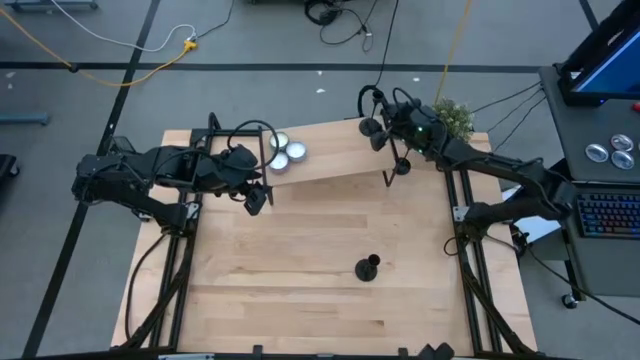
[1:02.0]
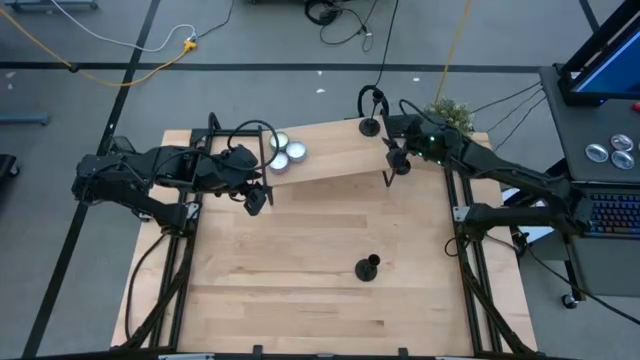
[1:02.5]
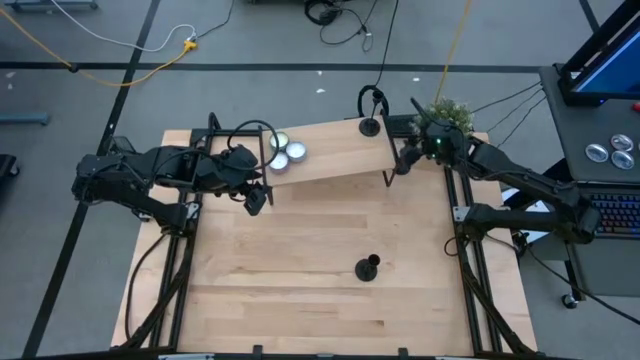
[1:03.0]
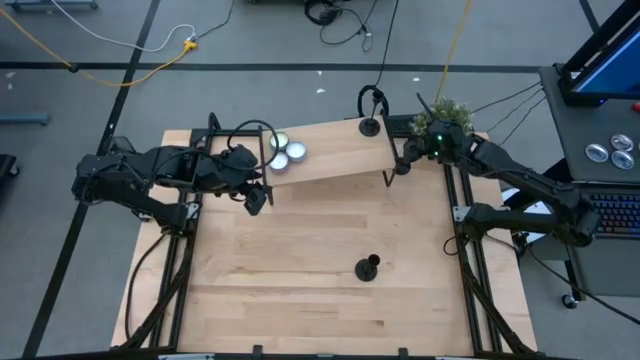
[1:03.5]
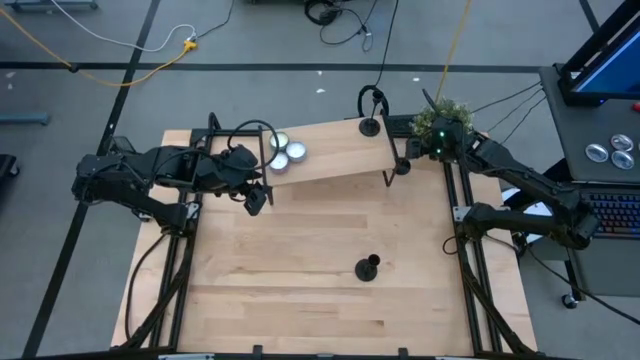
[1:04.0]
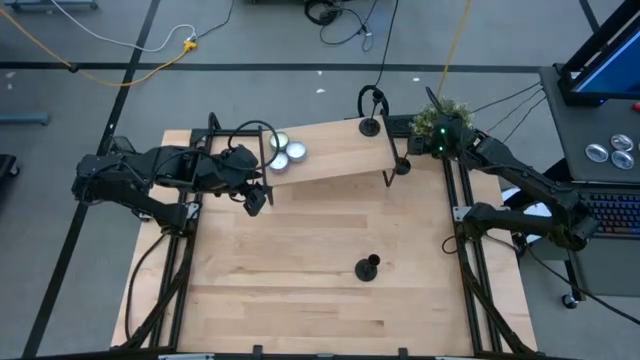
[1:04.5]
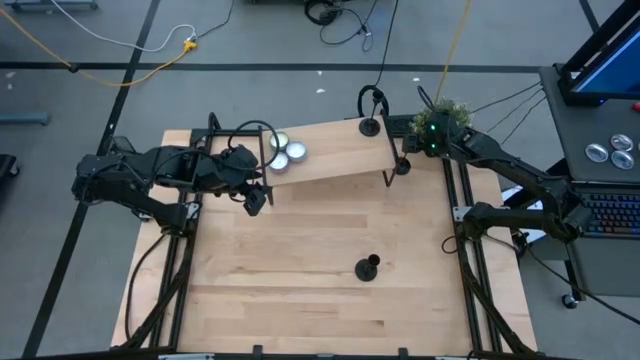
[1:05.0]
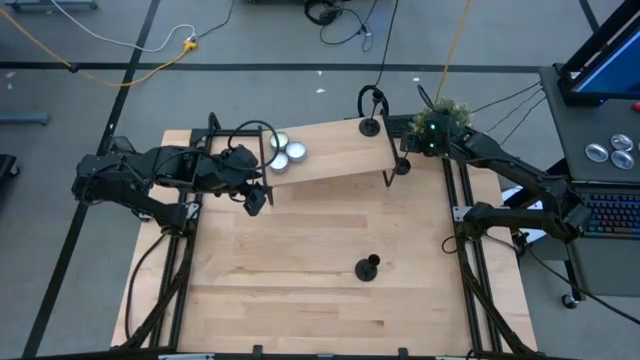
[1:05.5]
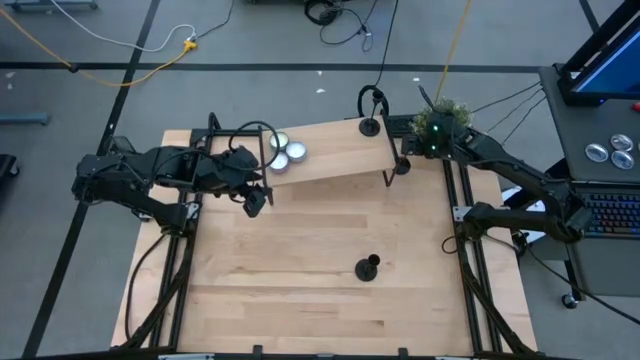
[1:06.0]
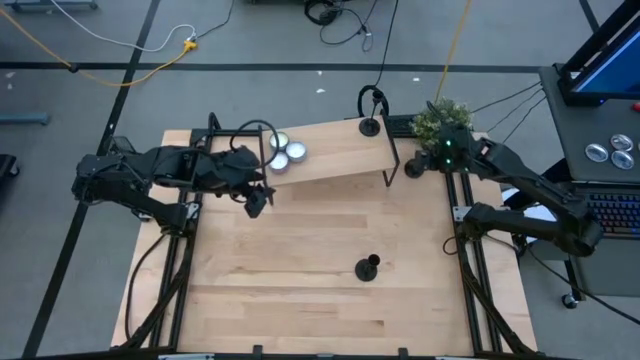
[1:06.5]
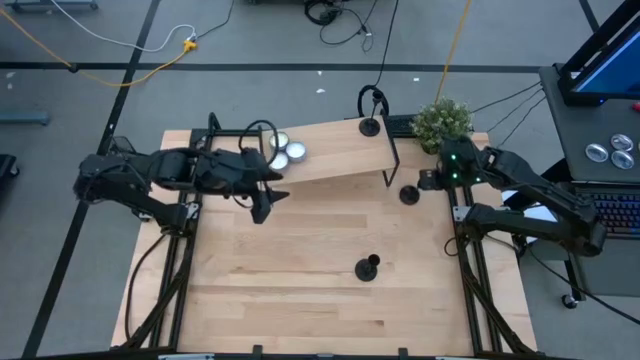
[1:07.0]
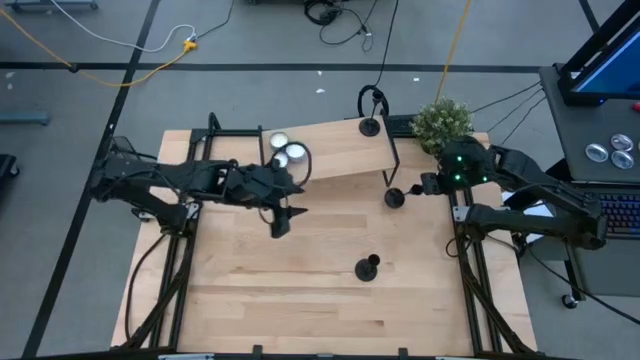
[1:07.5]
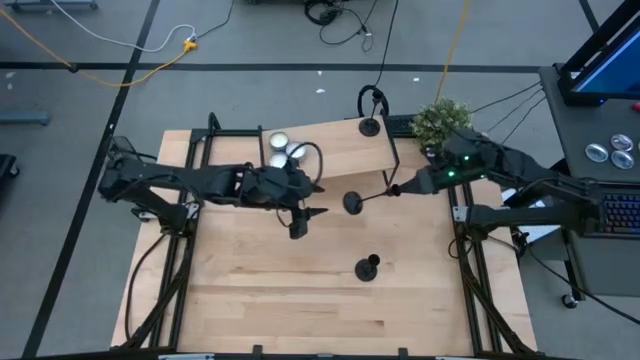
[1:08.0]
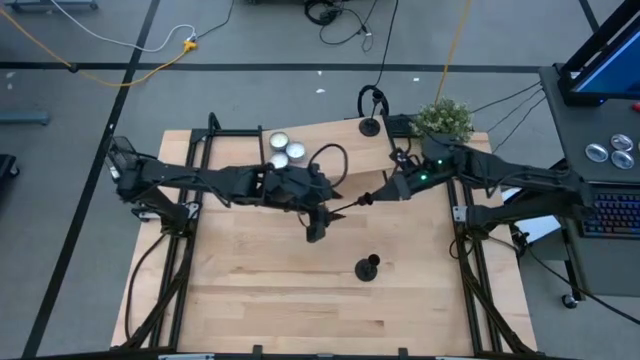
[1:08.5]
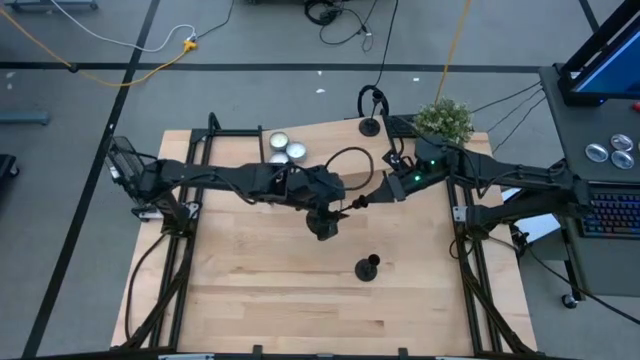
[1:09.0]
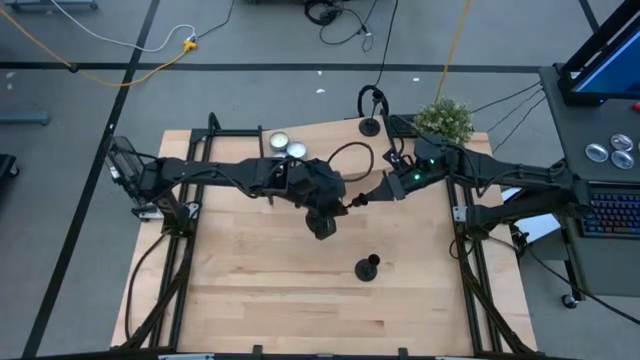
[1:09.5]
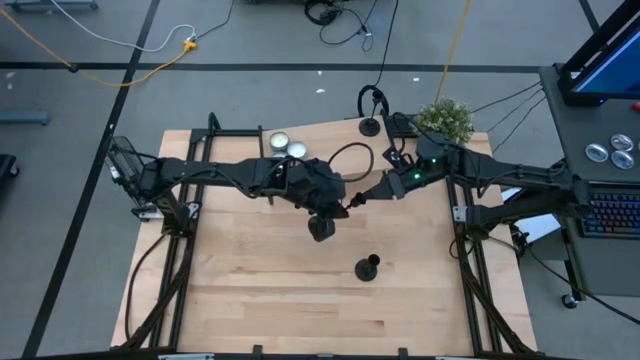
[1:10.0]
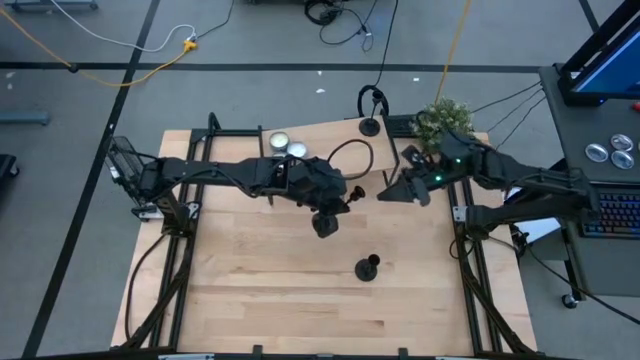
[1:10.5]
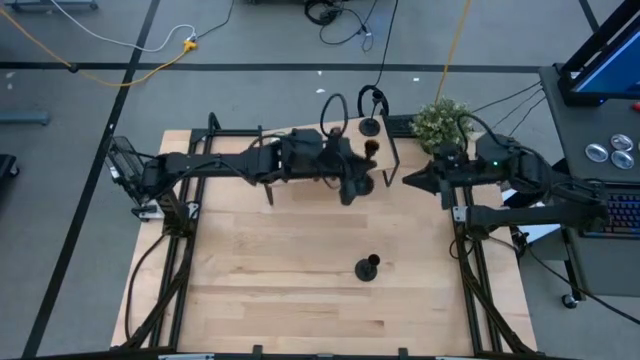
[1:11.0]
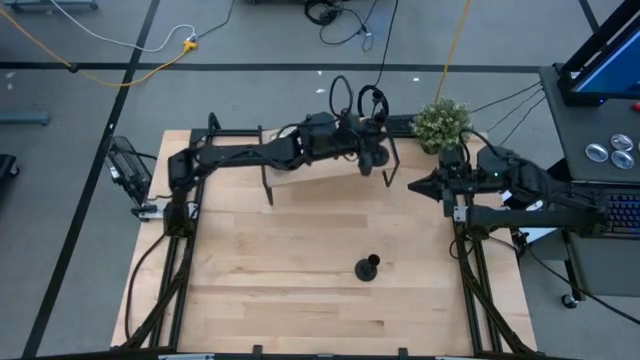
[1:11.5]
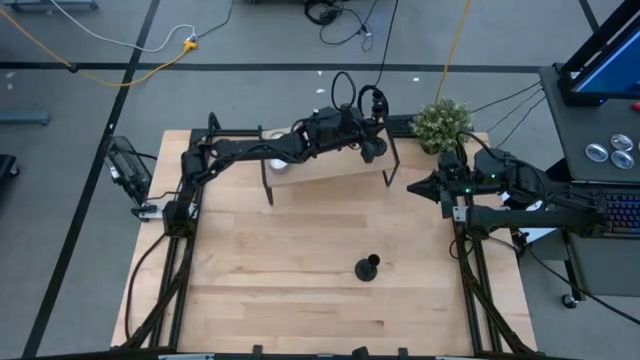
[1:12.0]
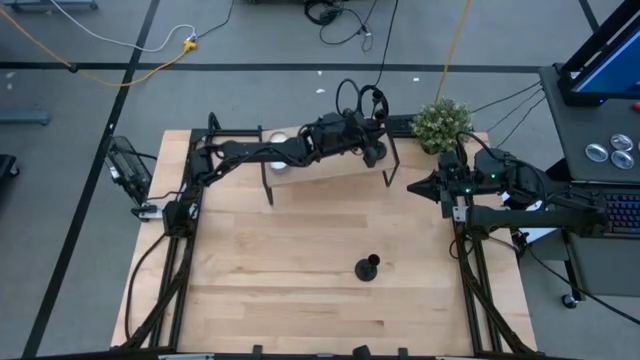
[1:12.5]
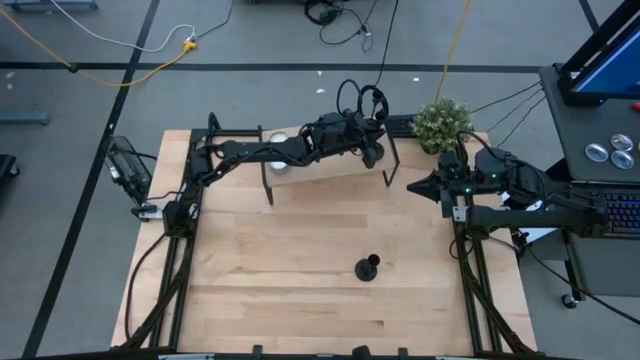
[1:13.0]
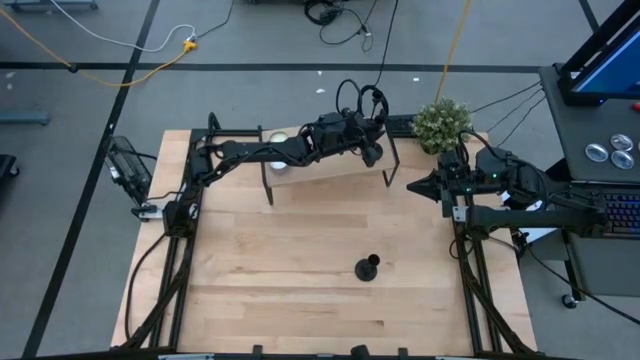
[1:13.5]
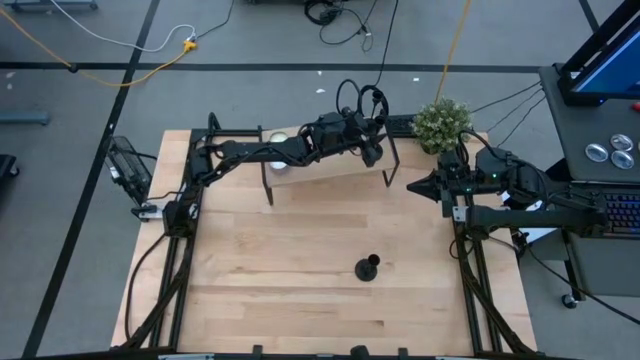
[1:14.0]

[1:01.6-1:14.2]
Task: Pick & Place candle stick holders
Put the top black candle holder on the shelf aligned with the other black candle holder

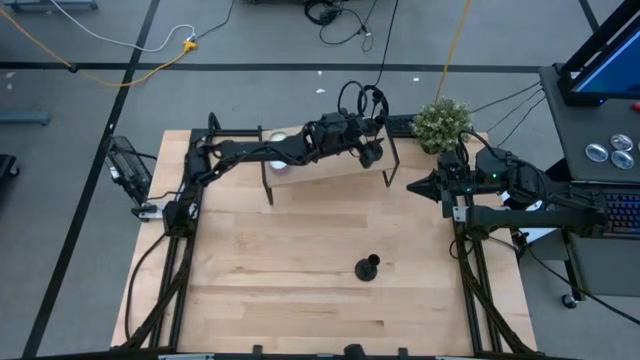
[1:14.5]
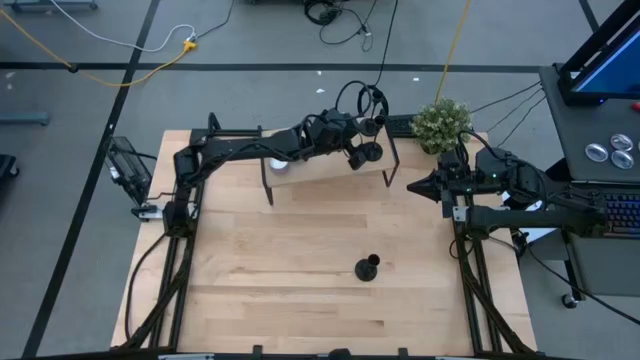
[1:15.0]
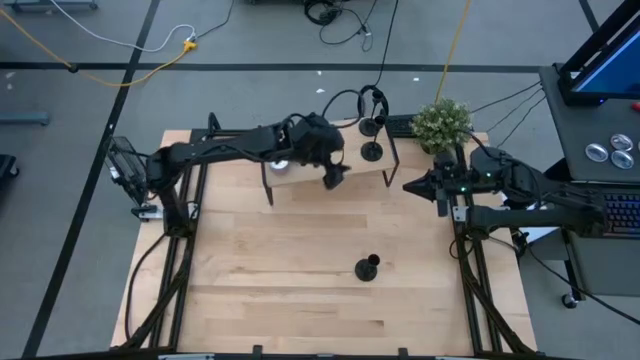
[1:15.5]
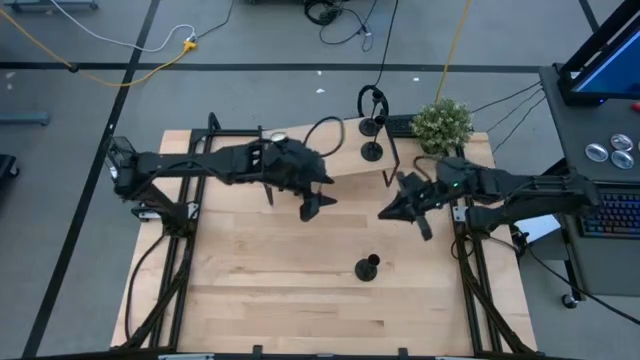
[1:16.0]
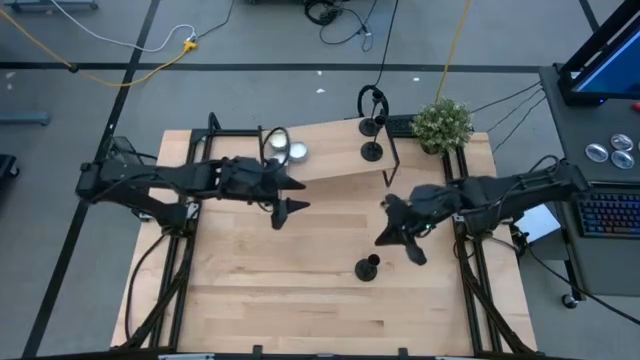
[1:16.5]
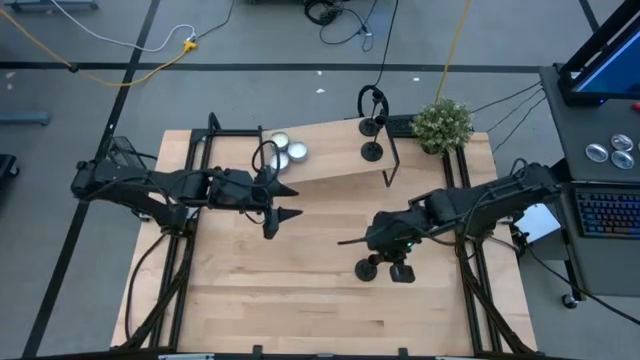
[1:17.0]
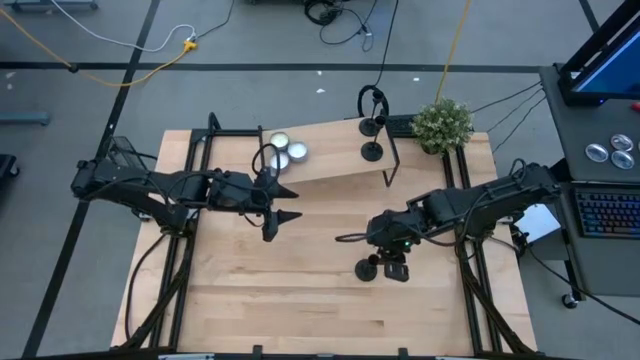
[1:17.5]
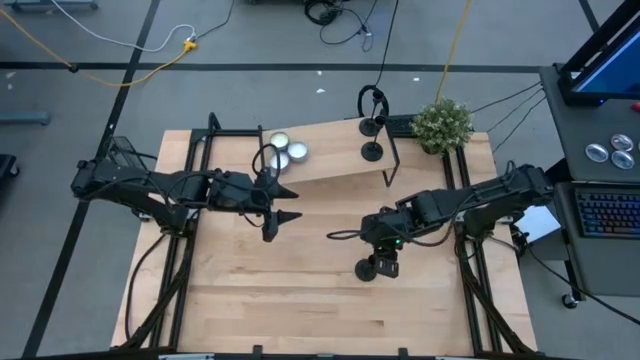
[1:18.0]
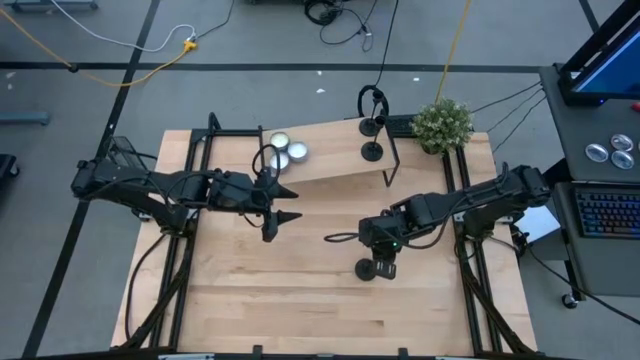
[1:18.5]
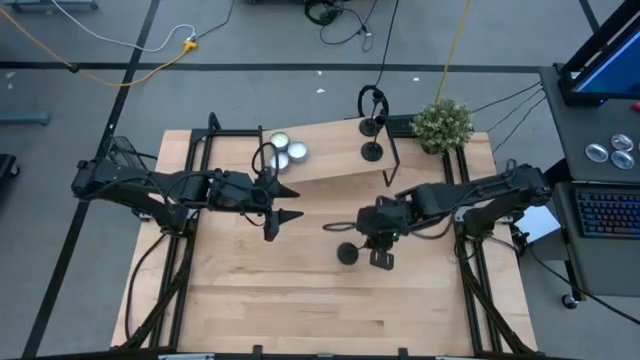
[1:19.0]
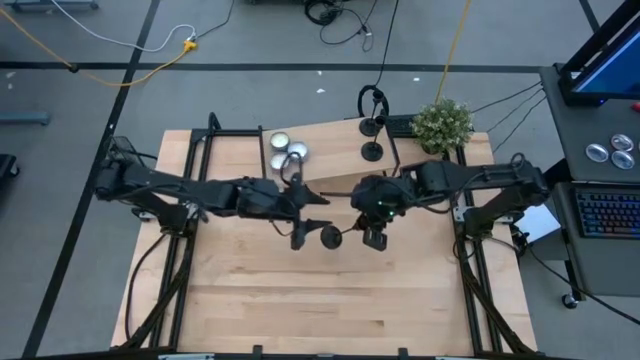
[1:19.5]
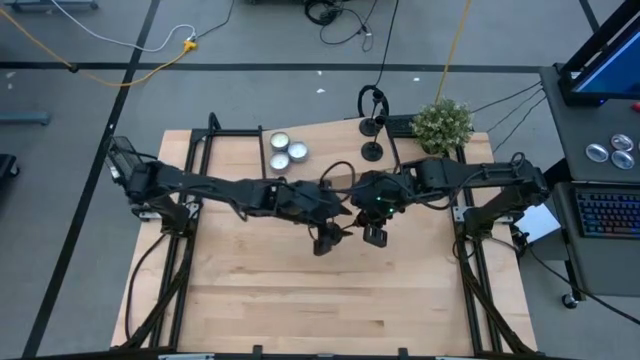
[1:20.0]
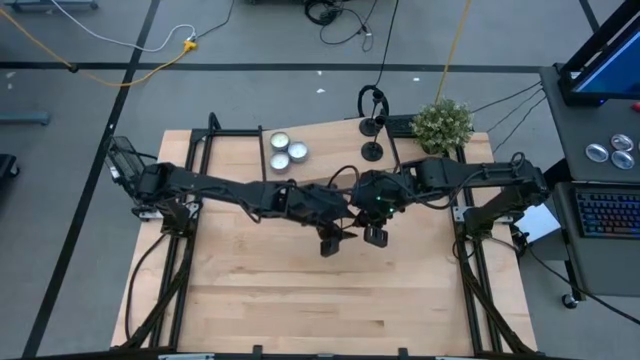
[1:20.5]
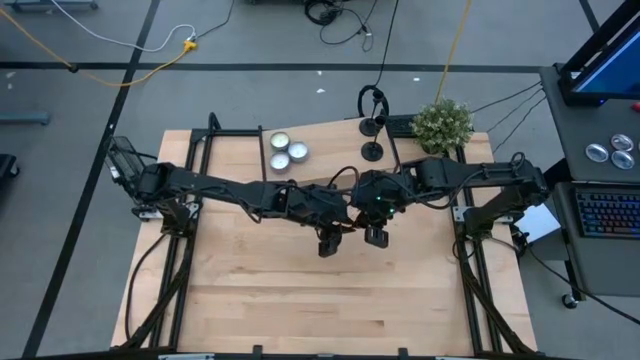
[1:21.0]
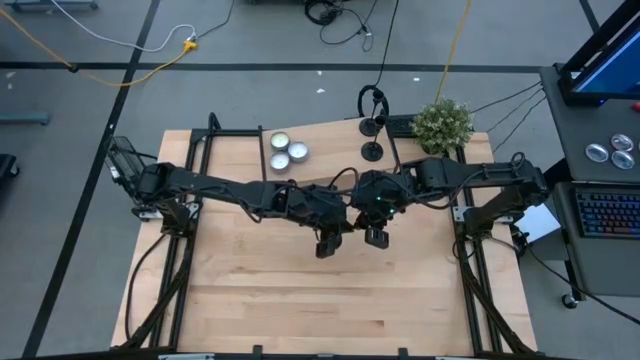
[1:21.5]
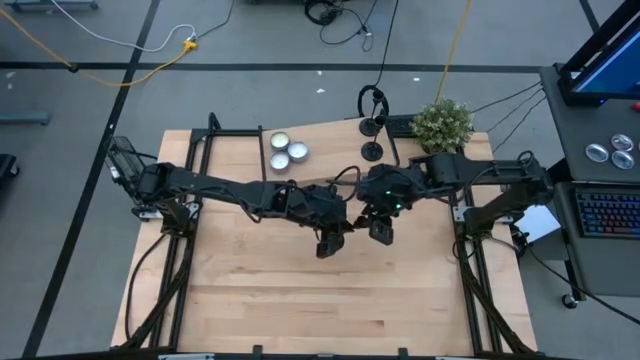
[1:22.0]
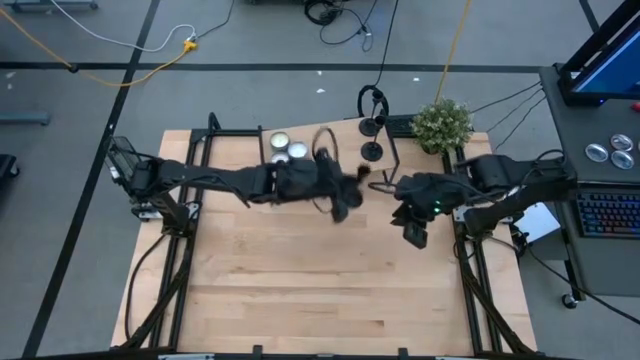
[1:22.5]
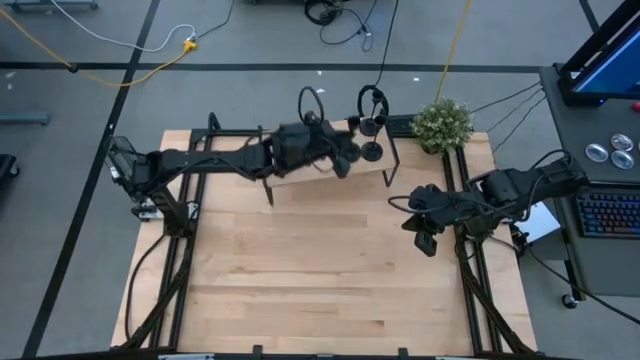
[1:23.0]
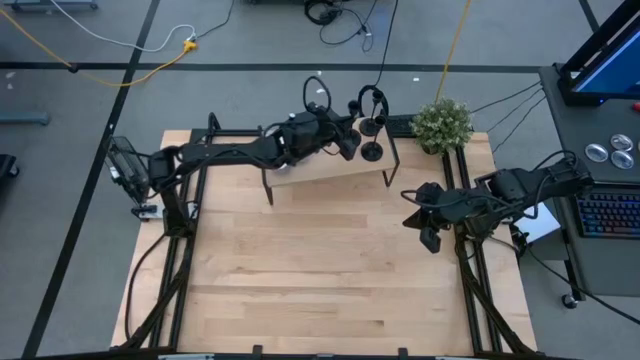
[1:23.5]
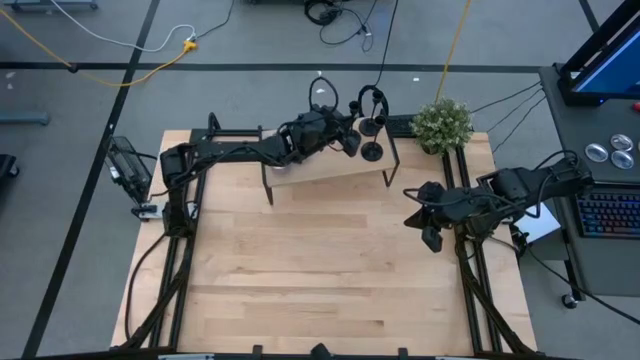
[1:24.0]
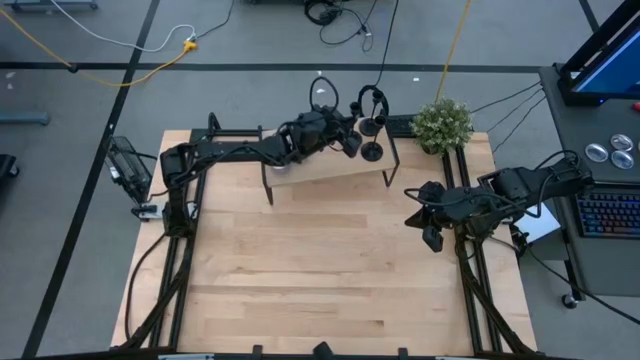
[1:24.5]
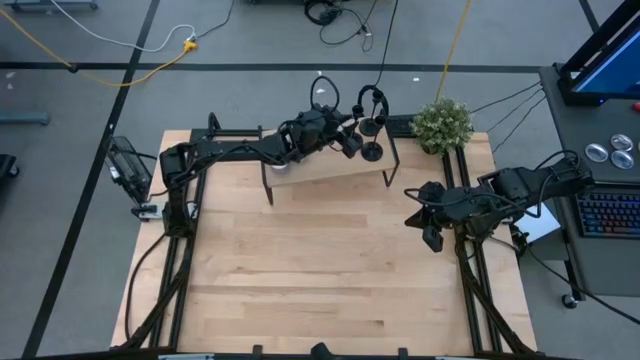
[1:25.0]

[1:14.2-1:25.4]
Put the black candle holder on the shelf
